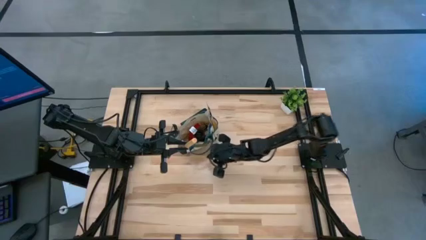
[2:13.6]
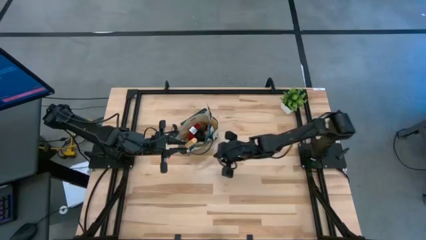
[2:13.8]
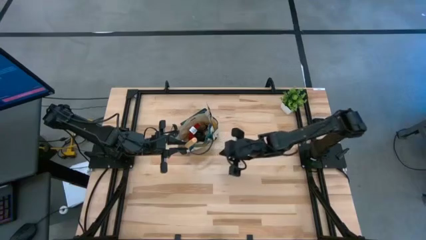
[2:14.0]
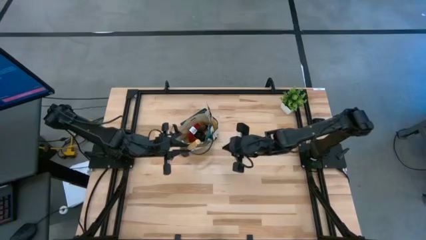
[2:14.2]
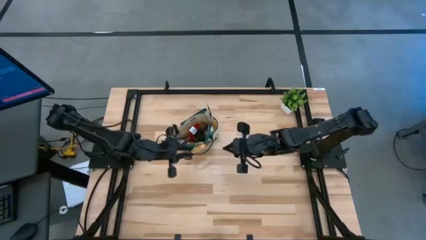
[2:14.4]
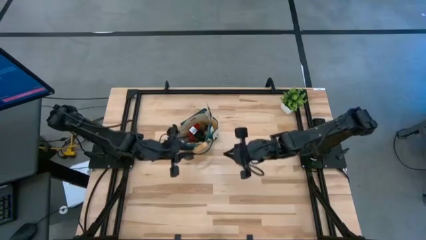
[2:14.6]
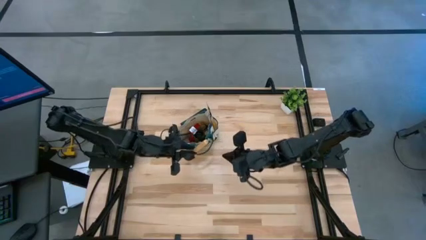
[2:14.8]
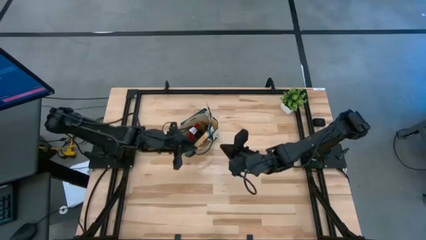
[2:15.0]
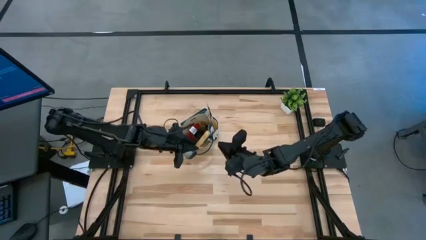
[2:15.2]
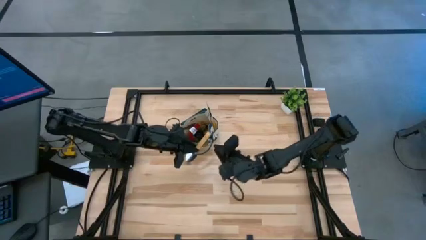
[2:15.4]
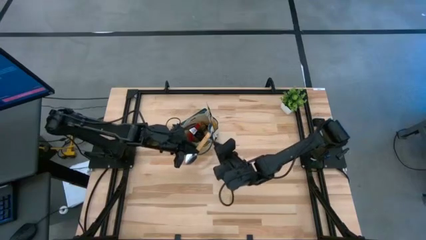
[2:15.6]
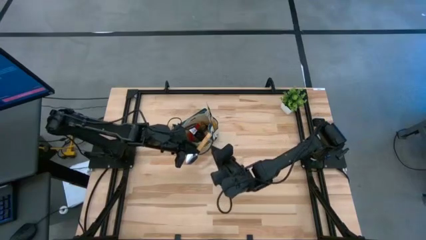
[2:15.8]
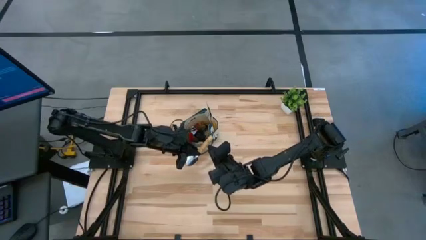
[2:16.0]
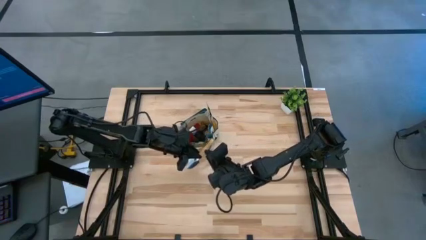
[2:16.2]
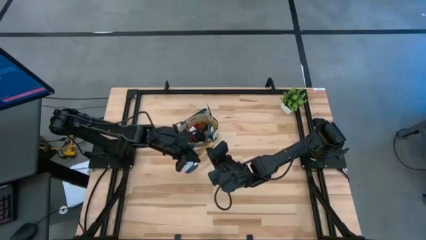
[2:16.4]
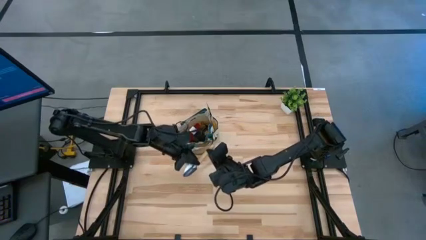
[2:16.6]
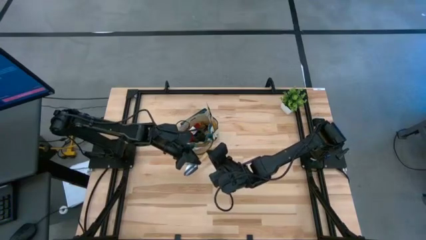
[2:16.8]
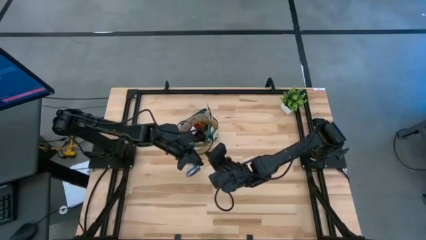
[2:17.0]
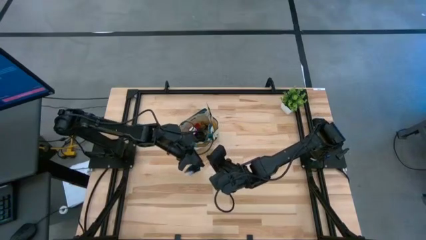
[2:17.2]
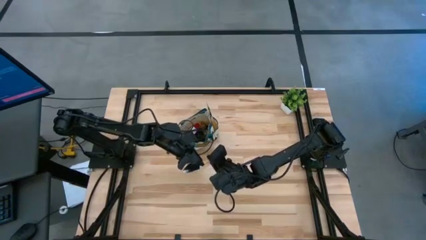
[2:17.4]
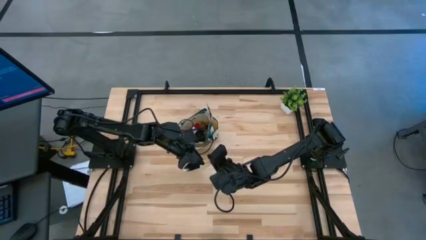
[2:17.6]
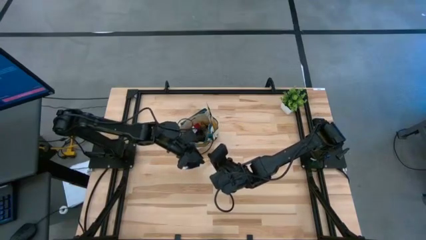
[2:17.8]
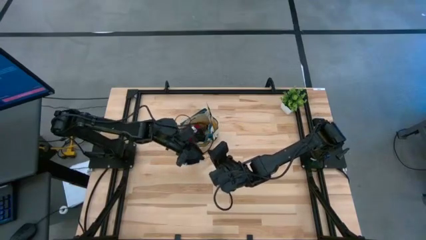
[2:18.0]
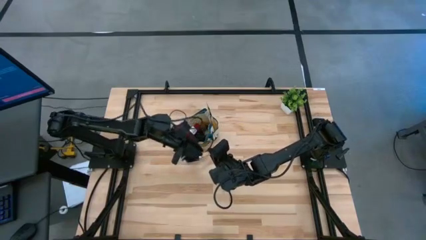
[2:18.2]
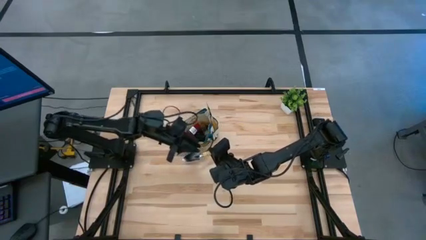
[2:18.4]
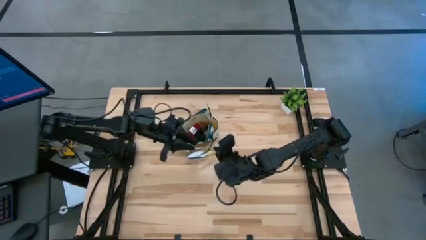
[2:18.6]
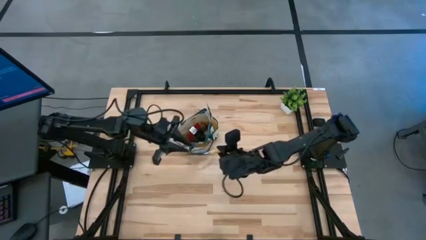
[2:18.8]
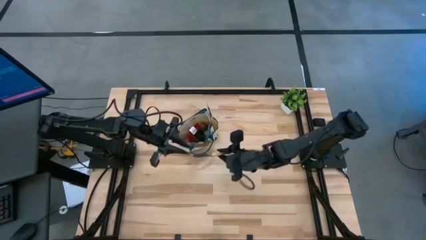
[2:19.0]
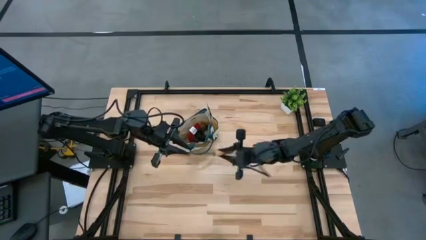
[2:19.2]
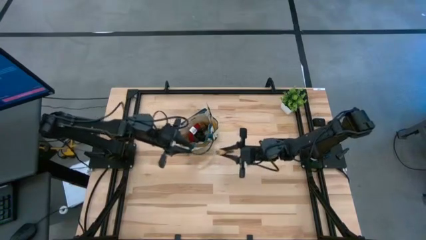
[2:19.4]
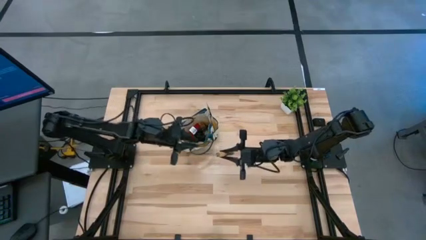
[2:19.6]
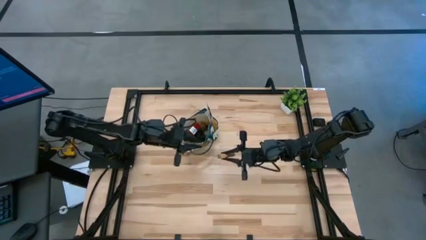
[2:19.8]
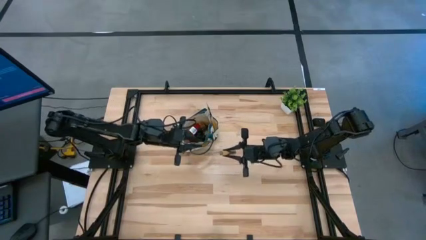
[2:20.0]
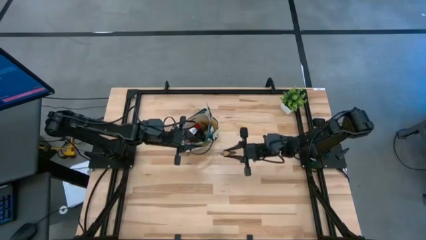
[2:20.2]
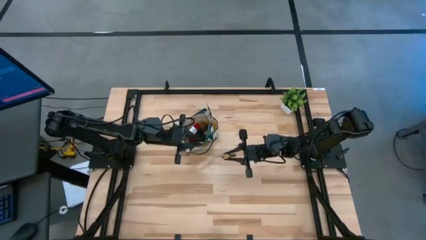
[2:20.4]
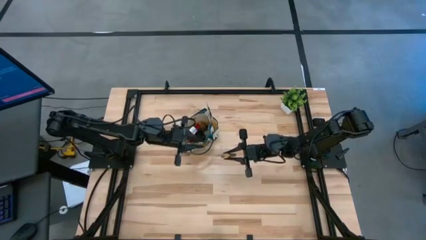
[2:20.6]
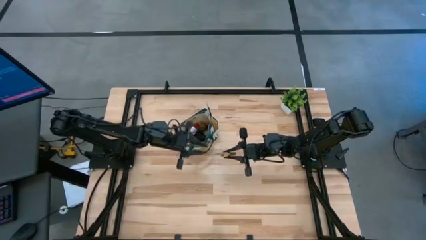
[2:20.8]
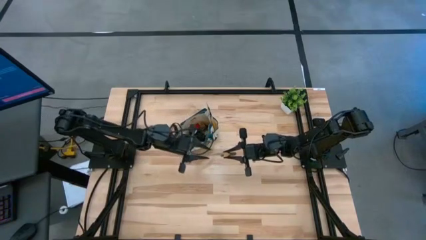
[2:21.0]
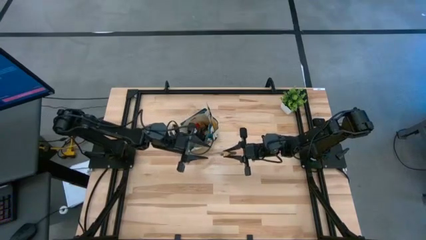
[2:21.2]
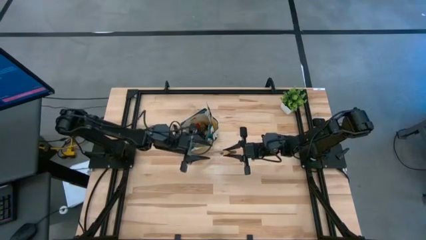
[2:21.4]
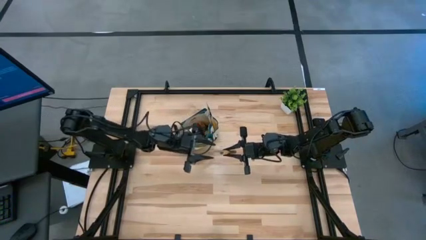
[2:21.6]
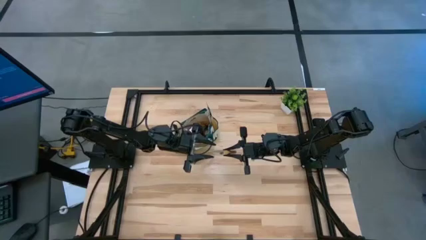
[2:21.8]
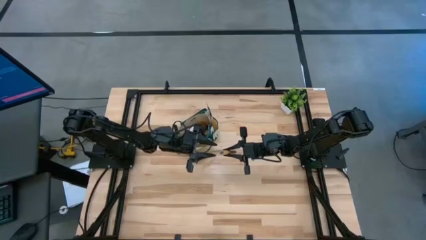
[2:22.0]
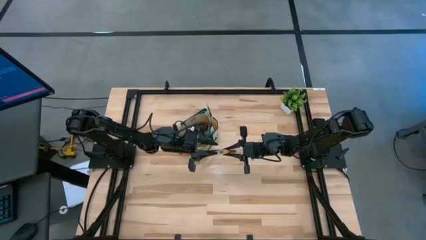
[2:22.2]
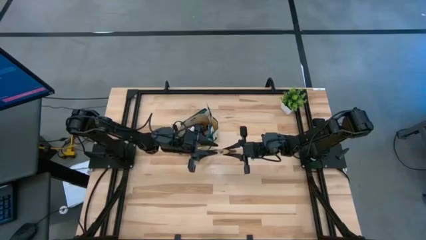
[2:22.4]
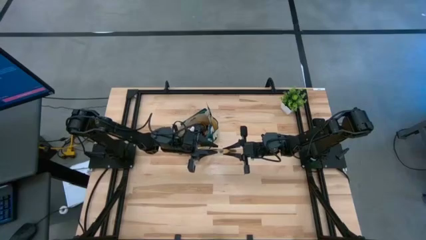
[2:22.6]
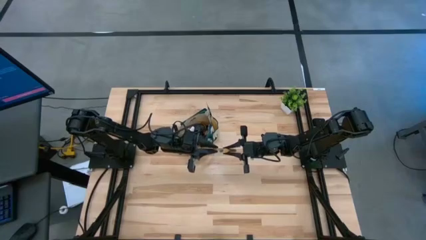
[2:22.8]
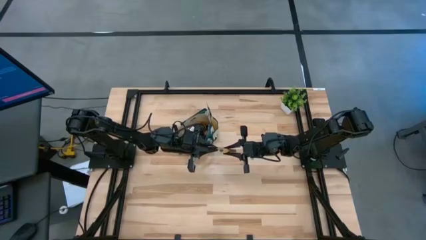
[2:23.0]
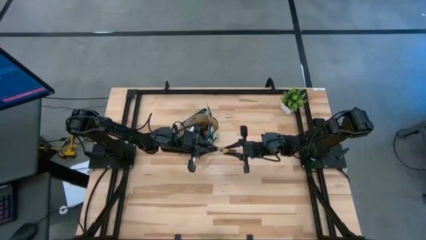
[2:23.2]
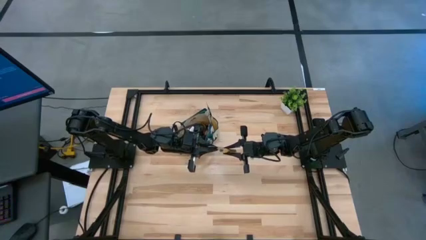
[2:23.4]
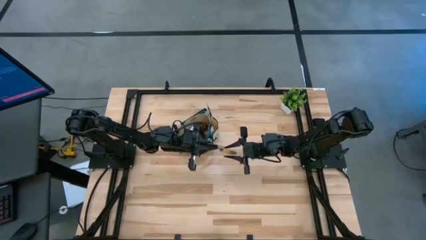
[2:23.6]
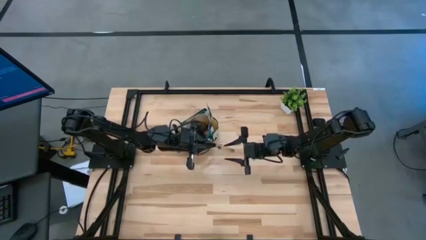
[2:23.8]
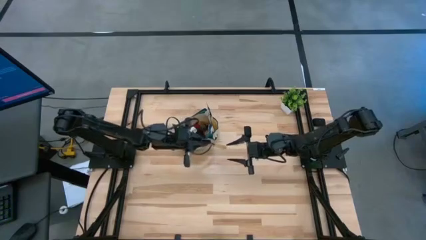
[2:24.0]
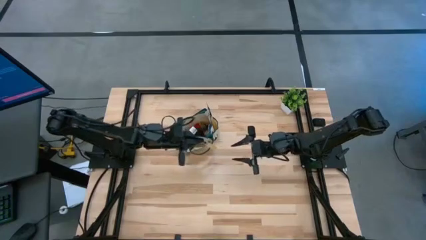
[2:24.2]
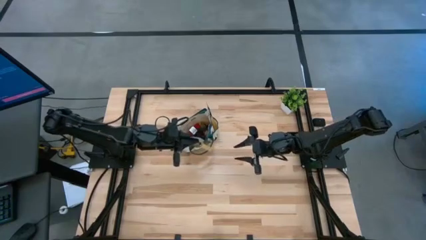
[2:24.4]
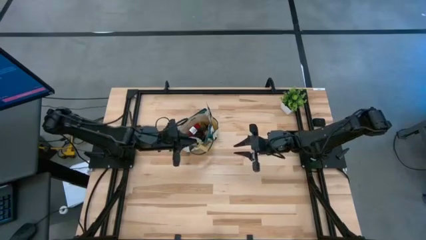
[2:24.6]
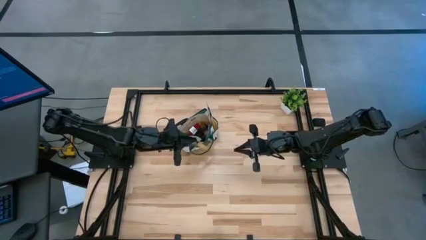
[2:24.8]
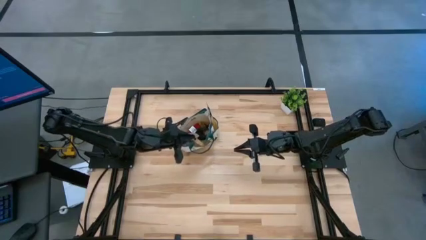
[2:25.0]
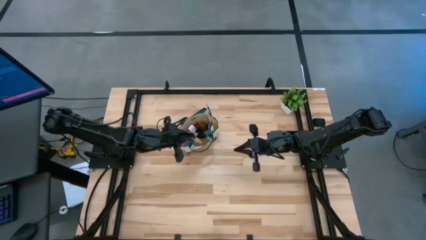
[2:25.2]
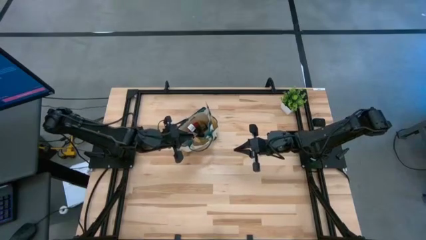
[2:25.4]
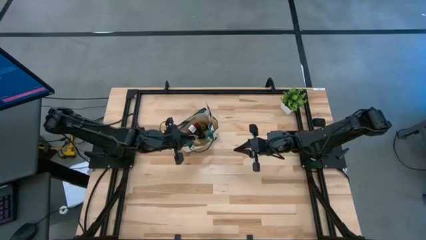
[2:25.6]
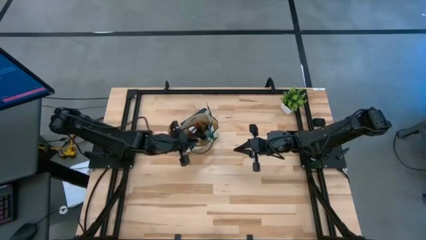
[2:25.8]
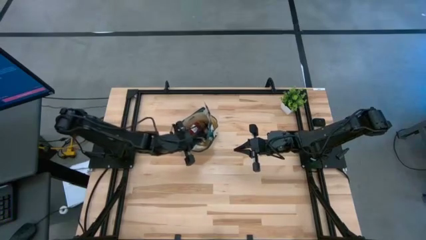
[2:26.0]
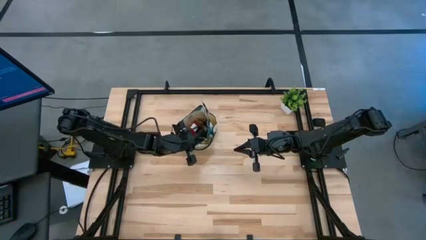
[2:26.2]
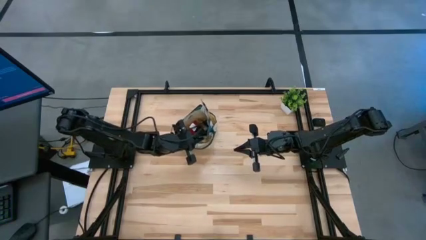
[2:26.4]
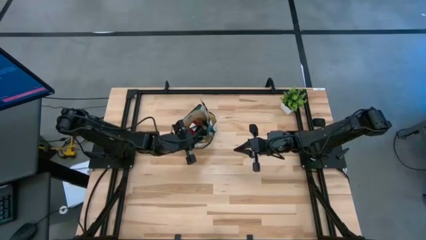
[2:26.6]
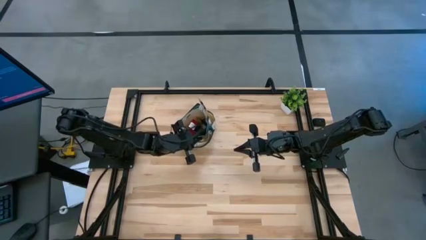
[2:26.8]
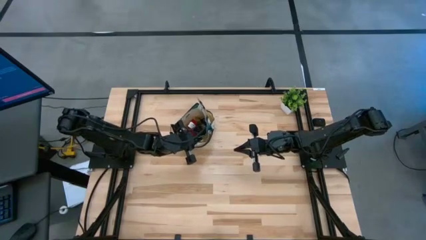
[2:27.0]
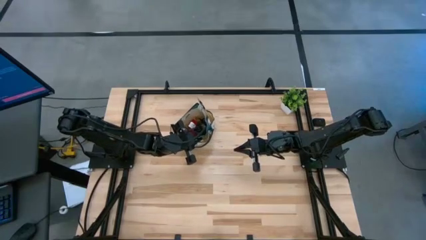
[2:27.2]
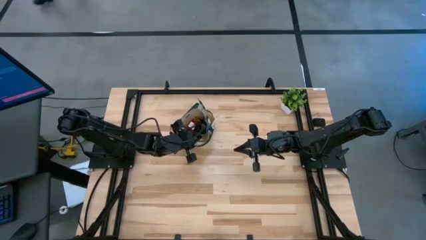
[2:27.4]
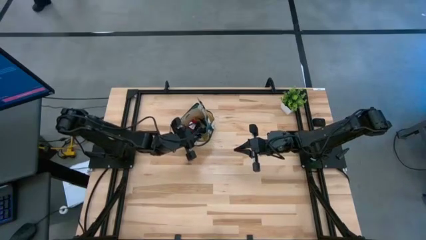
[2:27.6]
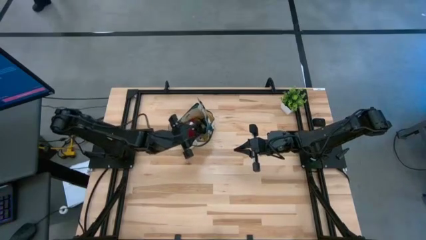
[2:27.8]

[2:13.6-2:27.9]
Task: Pick & Place Garden tools in Gardening bag
Put the brown trowel into the brown gardening bag

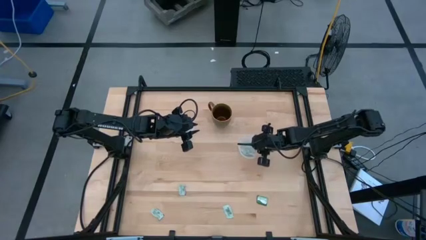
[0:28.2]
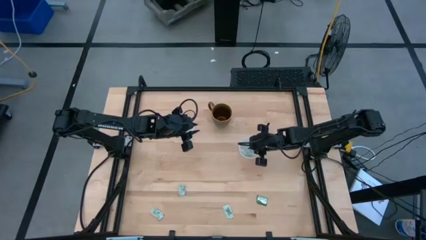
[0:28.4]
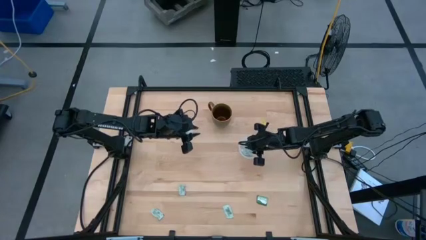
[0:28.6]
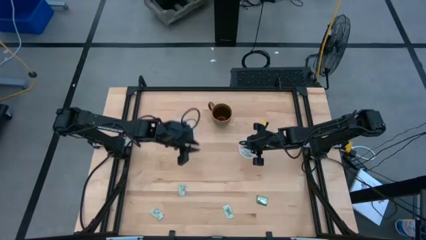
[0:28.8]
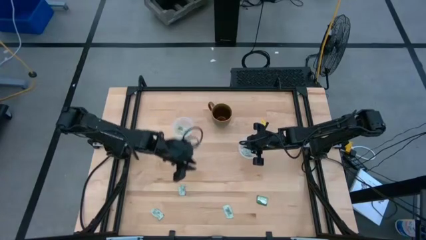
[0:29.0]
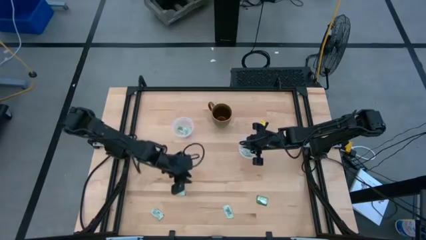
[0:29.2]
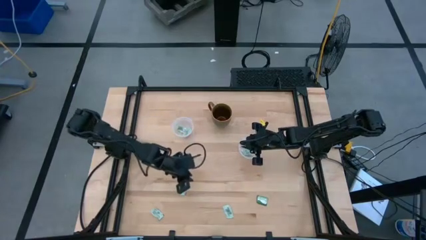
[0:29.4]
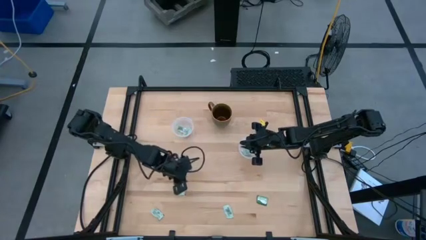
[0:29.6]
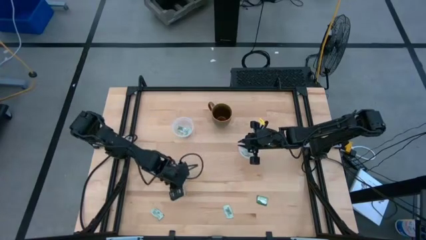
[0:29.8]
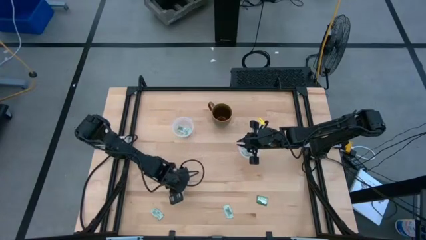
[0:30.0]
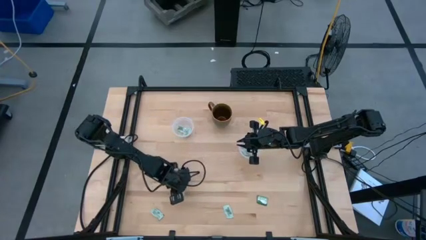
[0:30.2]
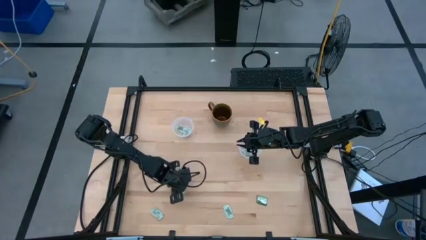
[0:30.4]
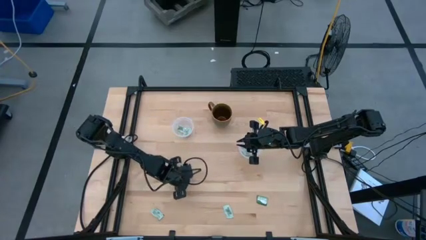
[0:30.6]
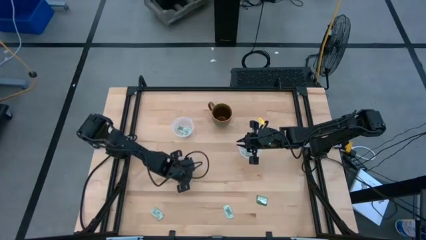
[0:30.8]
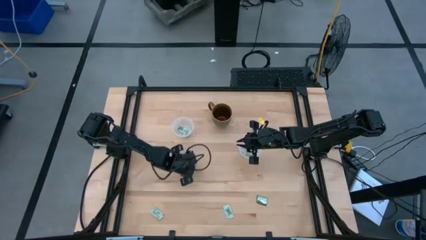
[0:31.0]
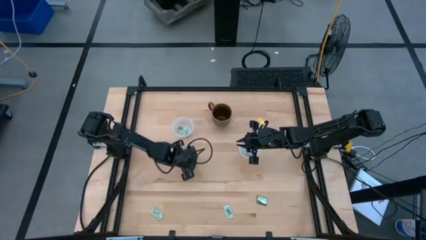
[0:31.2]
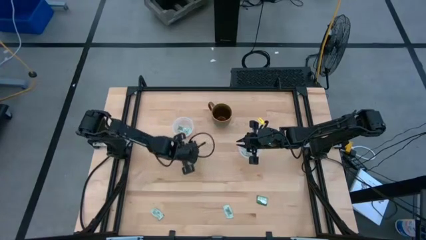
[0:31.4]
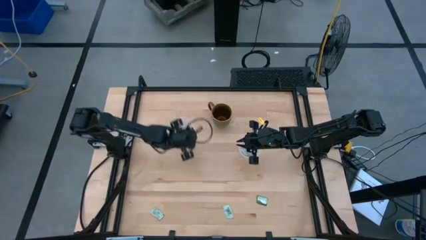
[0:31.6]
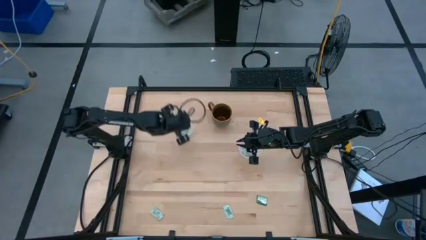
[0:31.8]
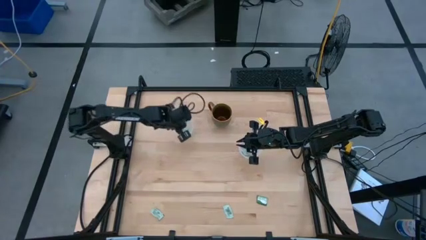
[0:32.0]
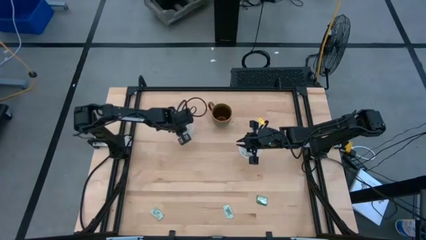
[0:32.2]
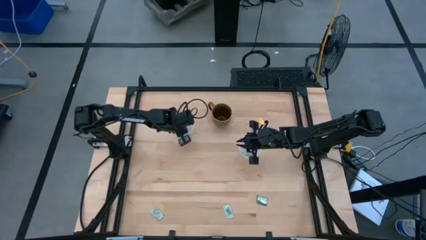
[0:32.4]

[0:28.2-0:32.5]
Task: Pick and place Stevia / Truvia into bins
Put the white stevia packet into the left round transparent container
